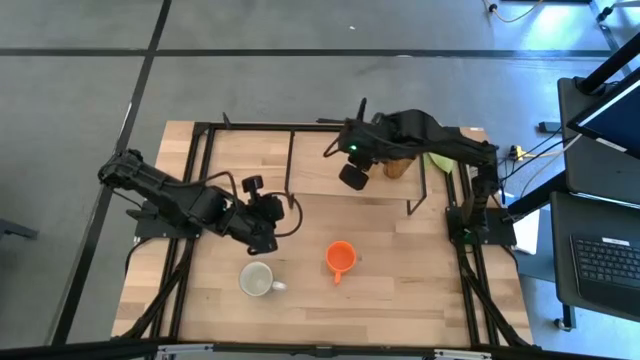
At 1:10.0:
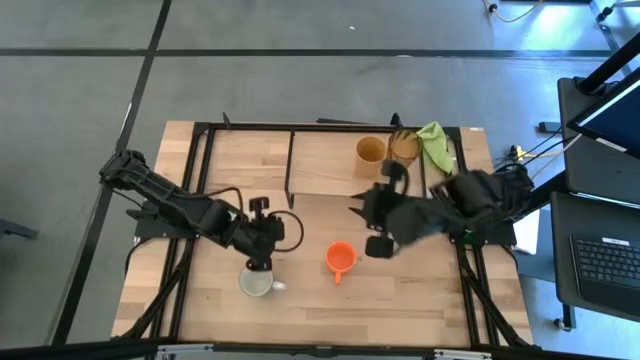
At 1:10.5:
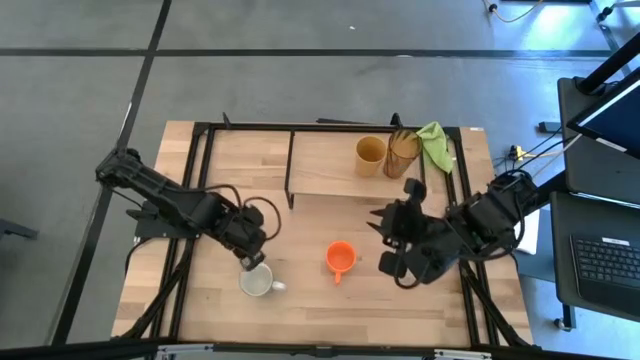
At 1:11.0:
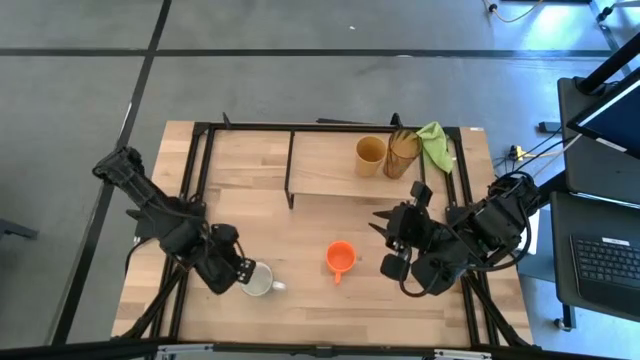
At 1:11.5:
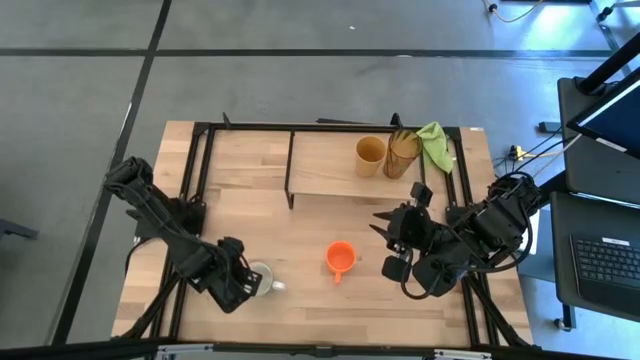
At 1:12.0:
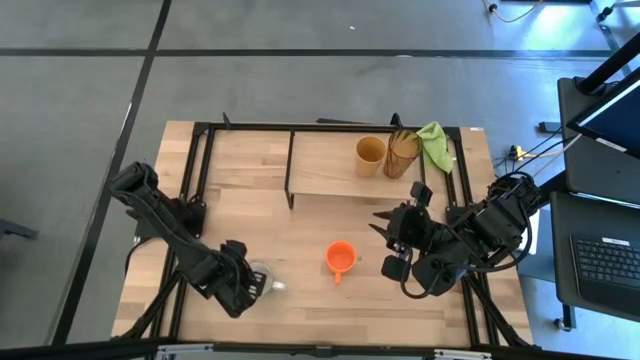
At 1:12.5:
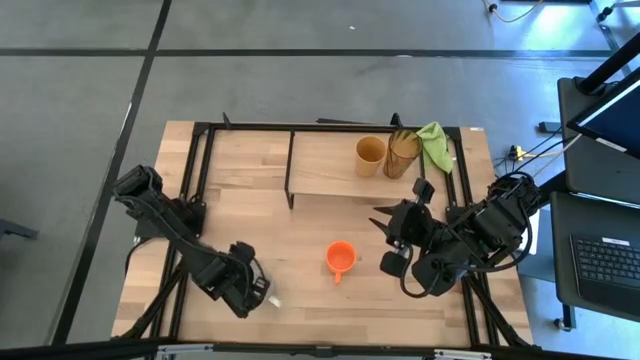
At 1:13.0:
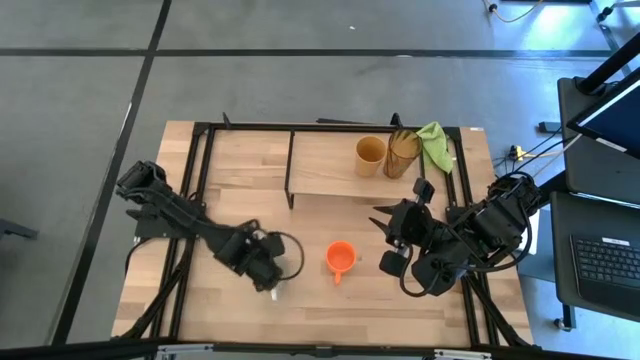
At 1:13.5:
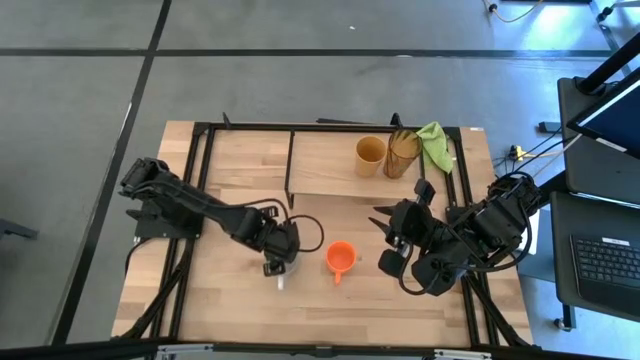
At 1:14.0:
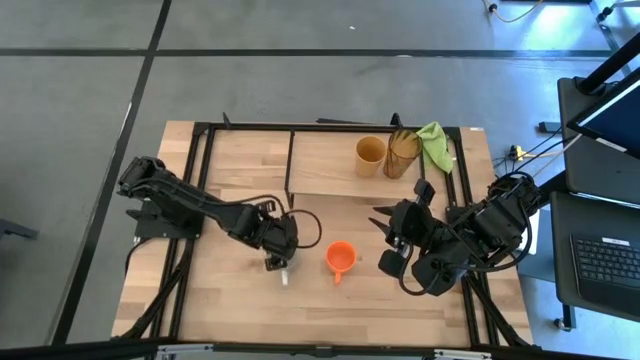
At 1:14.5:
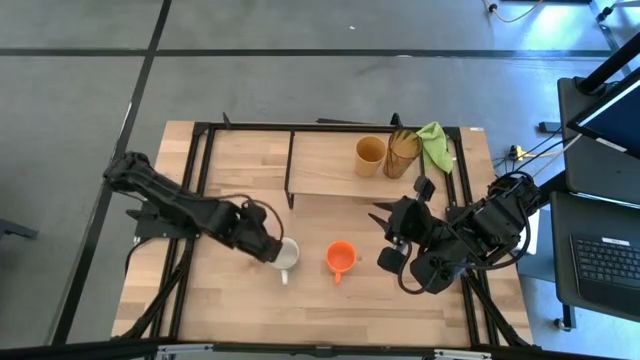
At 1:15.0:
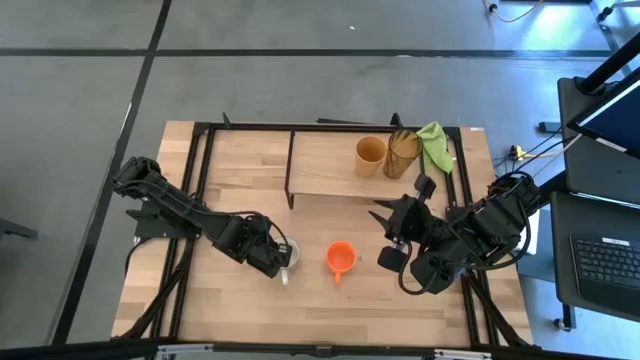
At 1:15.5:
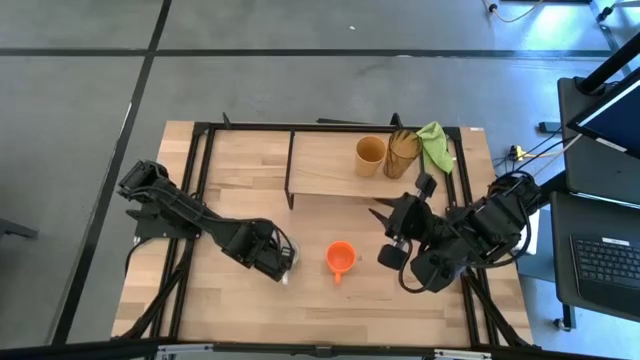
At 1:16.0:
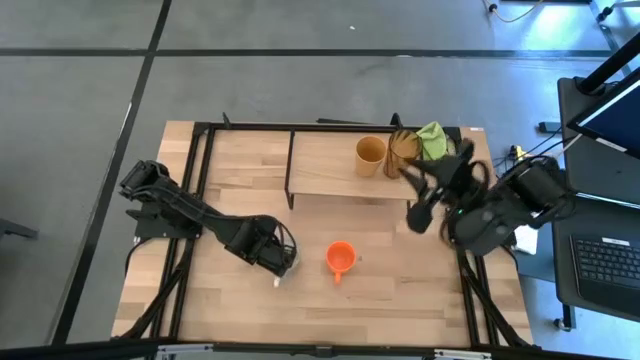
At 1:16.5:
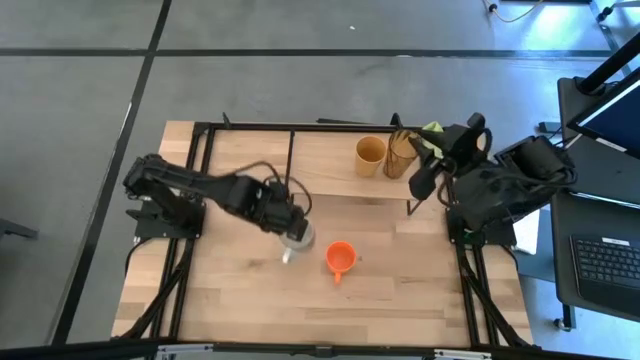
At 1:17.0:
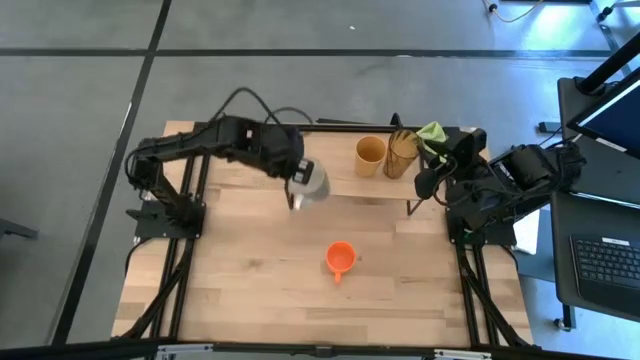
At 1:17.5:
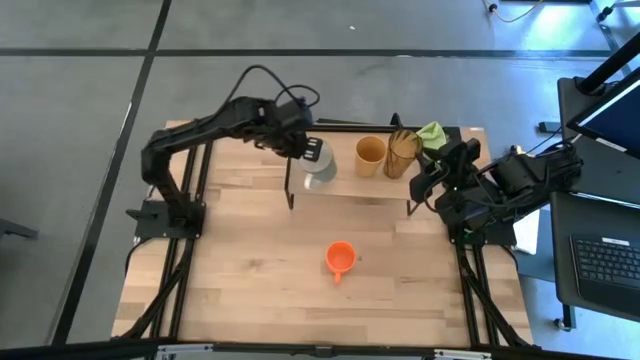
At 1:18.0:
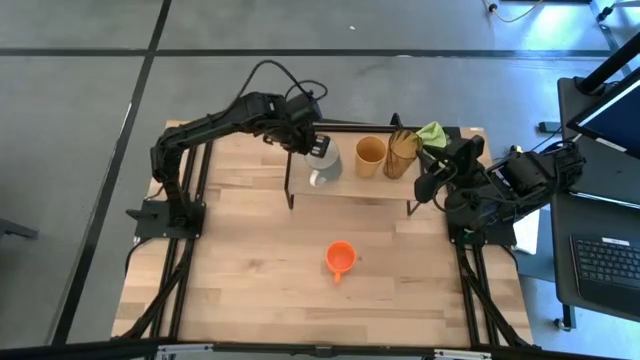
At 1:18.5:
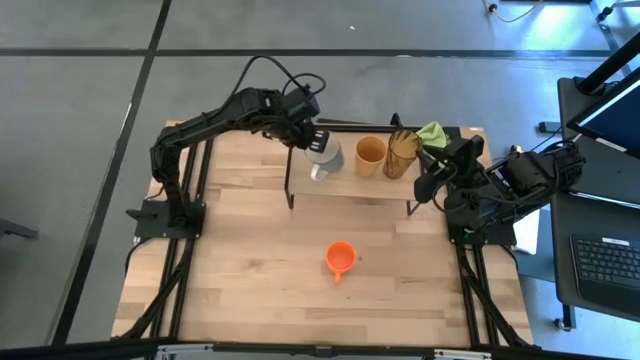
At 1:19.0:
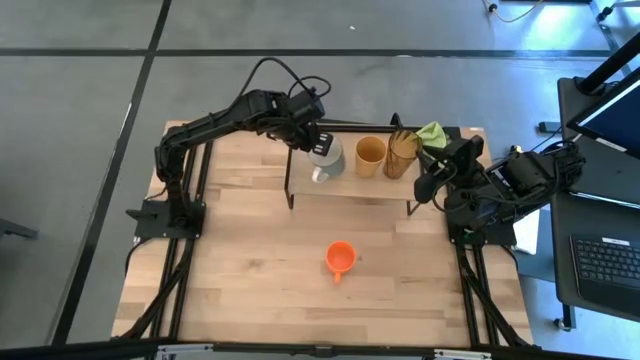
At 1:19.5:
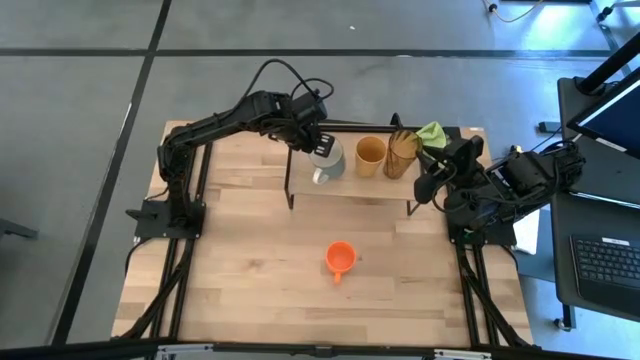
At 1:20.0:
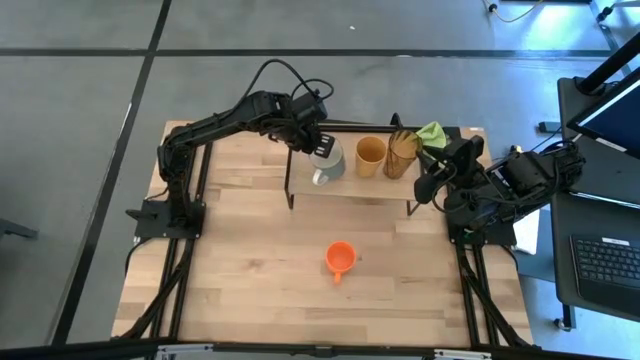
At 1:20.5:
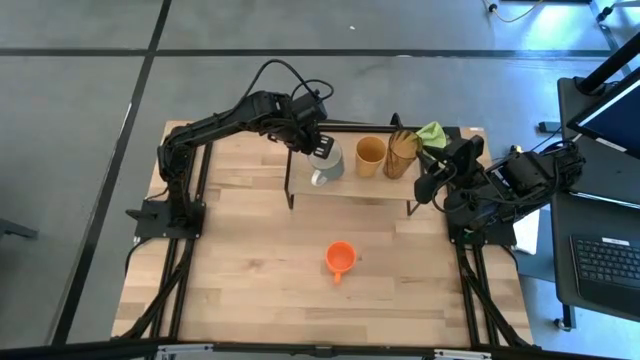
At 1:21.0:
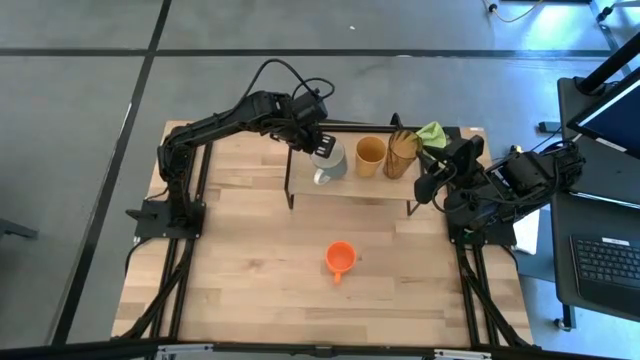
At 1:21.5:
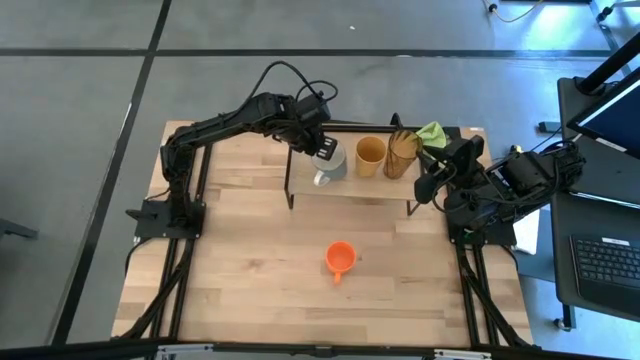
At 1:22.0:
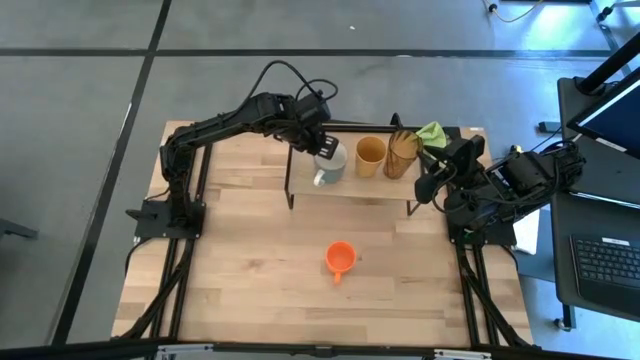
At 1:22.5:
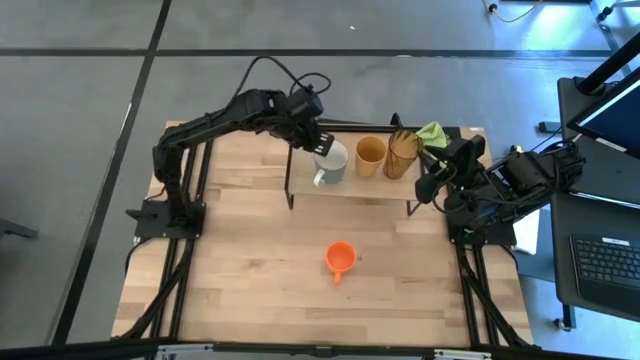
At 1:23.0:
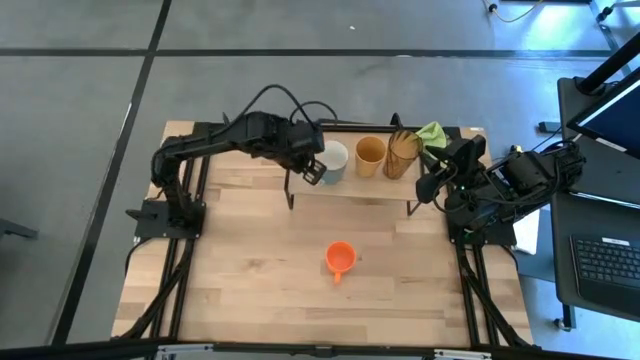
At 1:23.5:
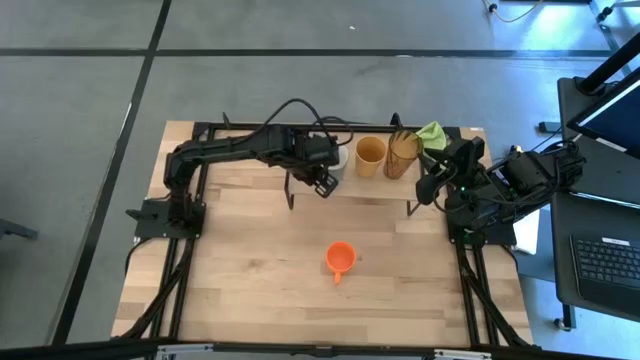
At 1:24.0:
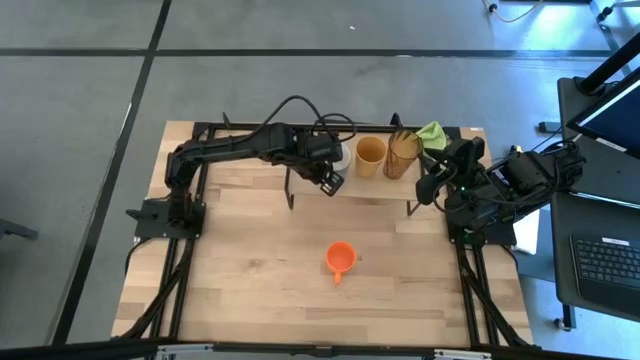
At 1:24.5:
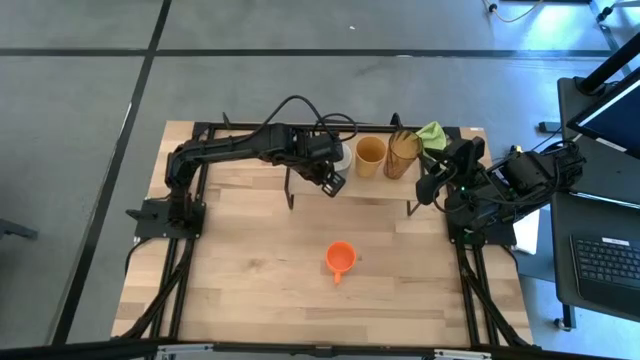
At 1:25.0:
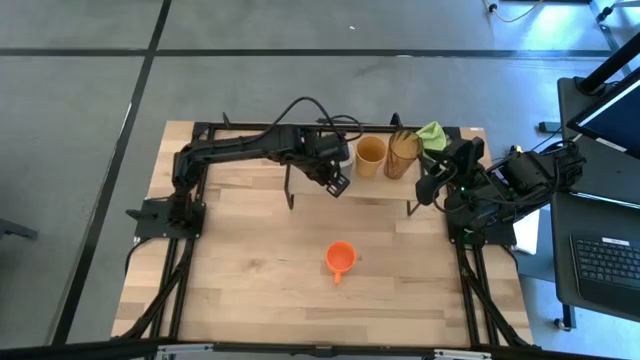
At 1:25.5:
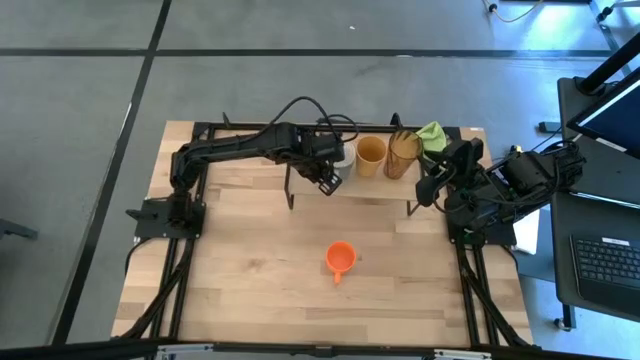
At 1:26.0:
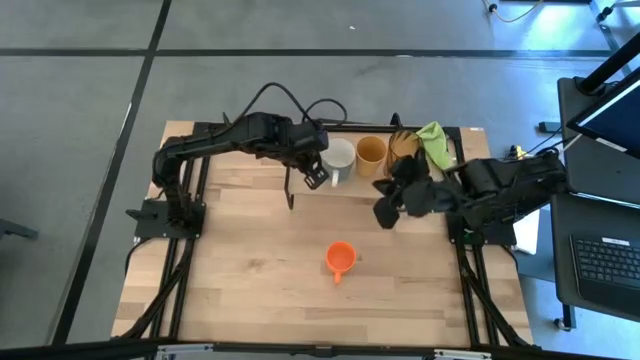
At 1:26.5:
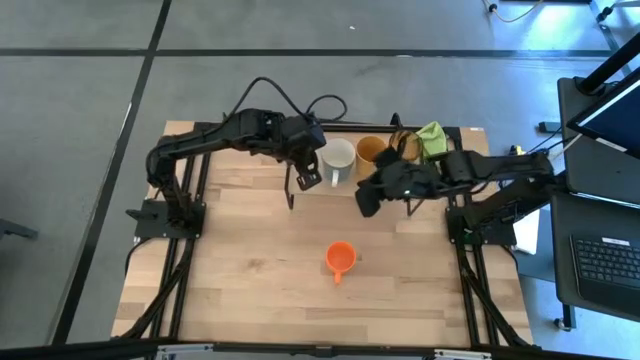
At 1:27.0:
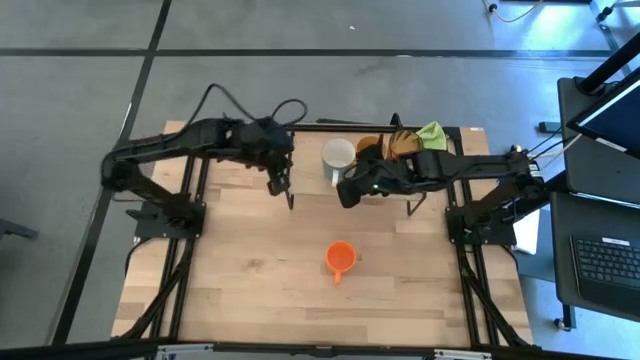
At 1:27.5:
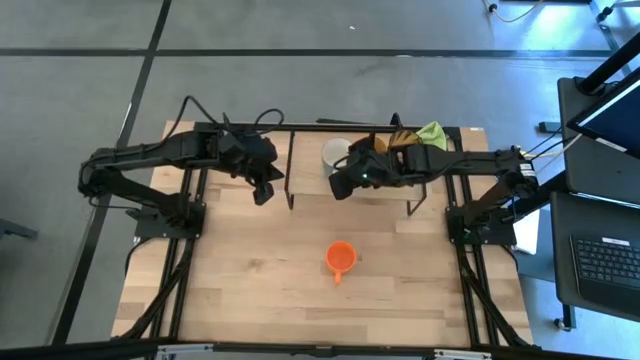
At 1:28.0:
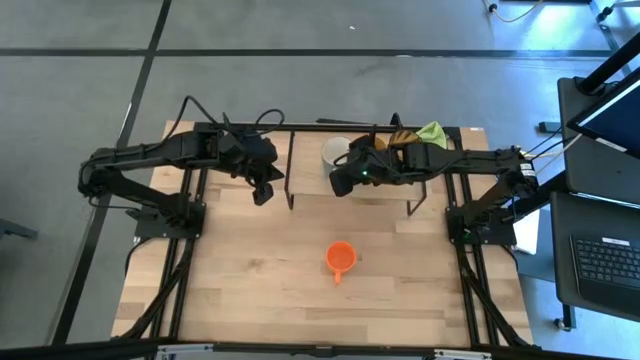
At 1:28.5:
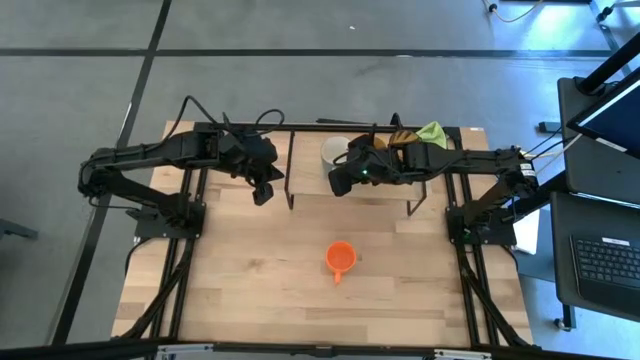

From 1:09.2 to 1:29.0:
Task: Stack small to large cups/mugs on shelf
Put the blue mug on the shelf

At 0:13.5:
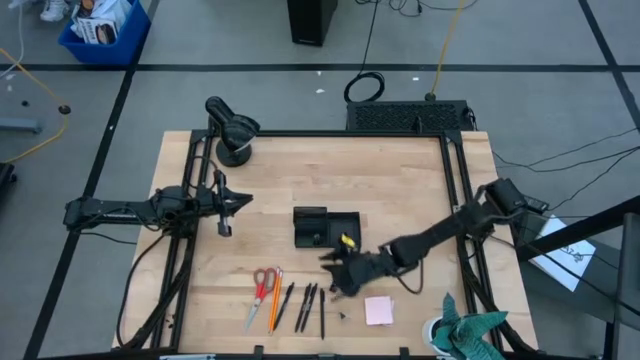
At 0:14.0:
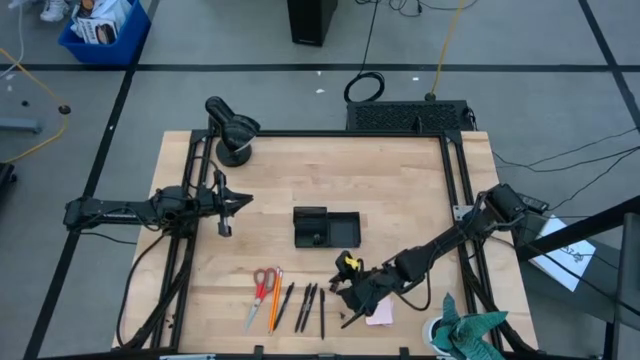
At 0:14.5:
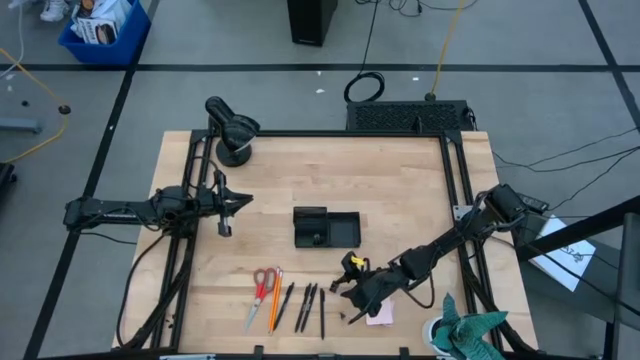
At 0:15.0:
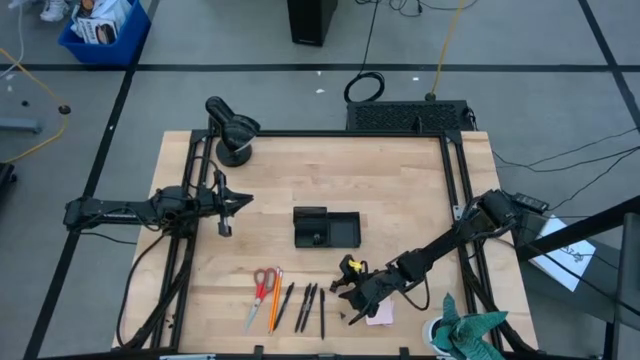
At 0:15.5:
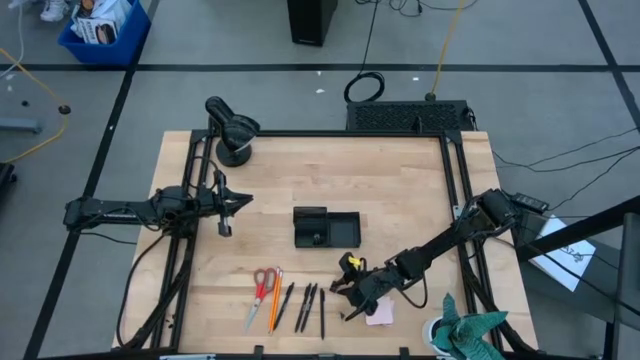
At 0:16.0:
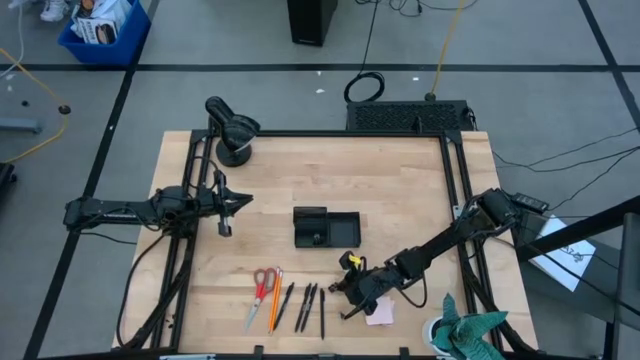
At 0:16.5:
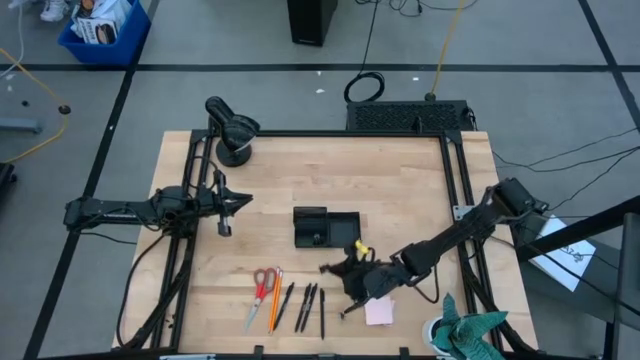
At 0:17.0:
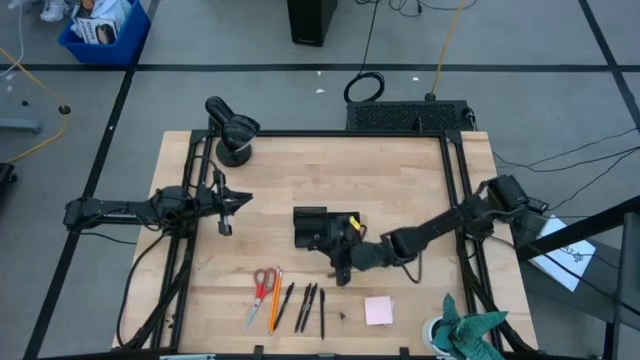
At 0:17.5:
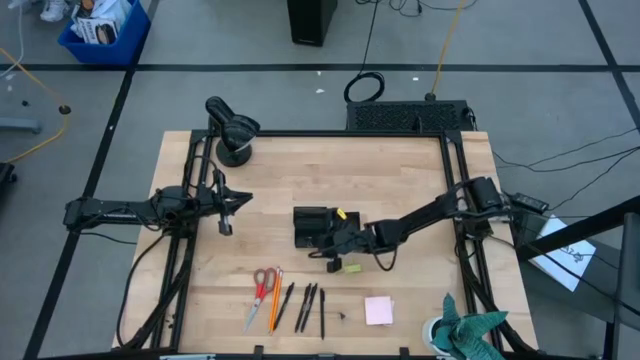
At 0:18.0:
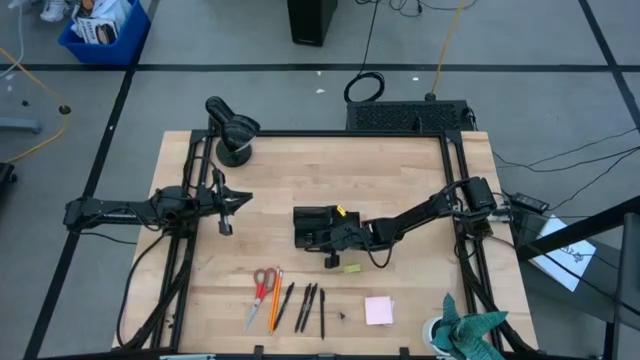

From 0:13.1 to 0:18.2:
Task: Pick and place office supplies into organizer
Put the binder clip into the black desk organizer
